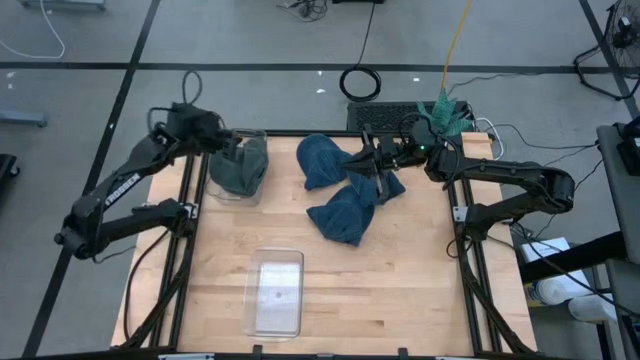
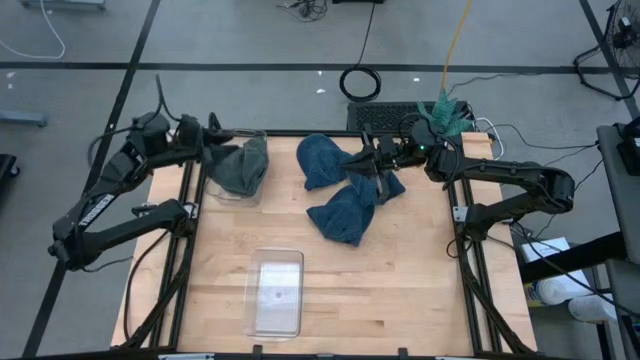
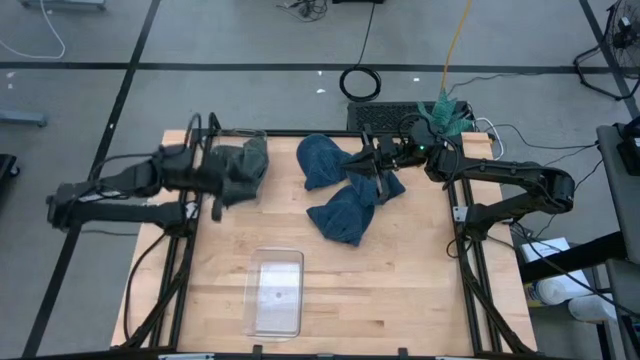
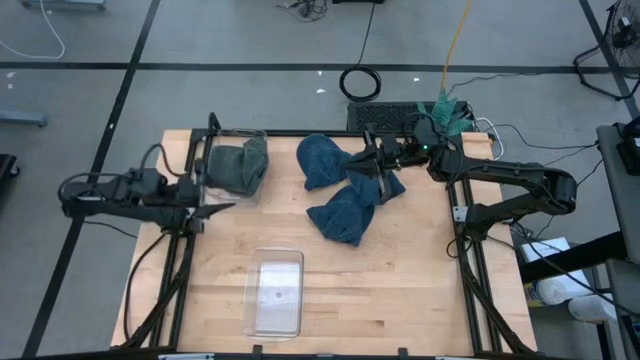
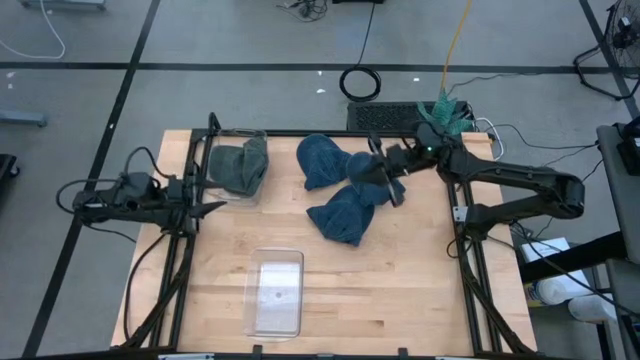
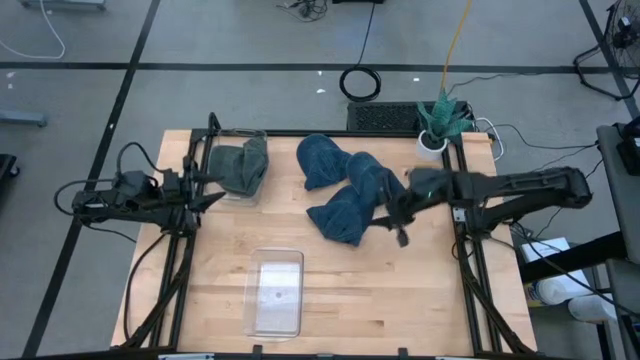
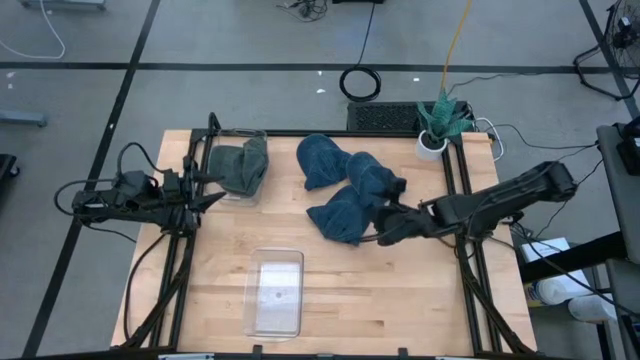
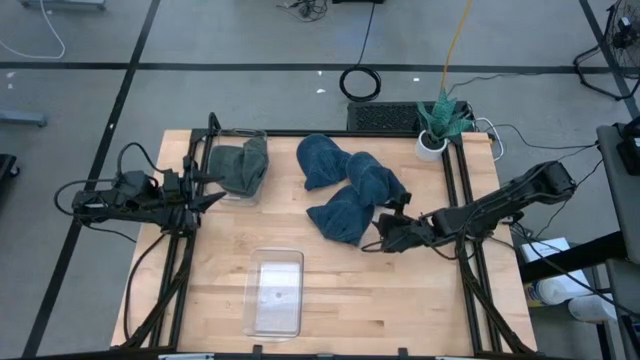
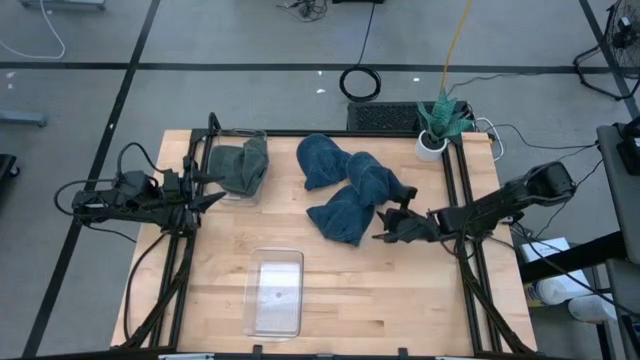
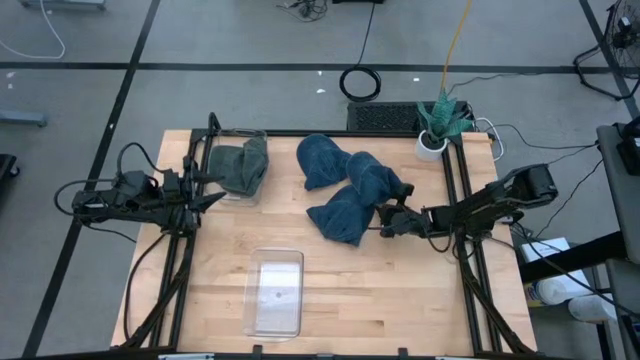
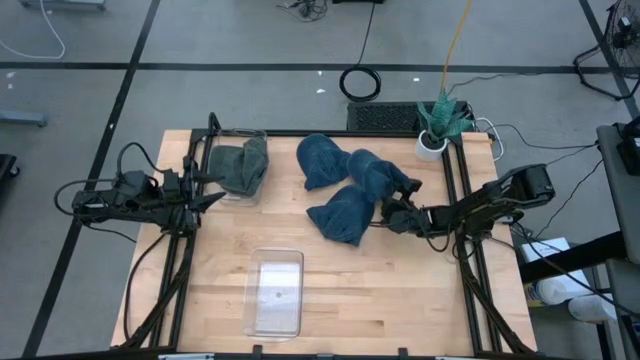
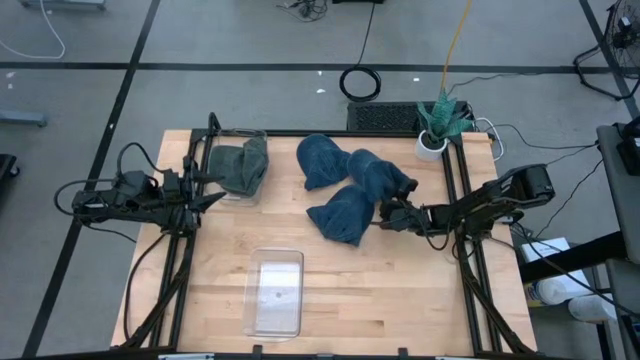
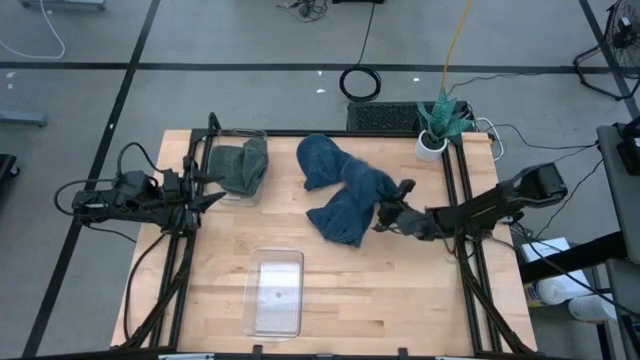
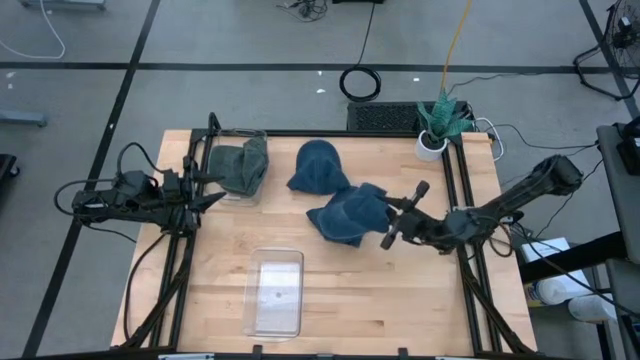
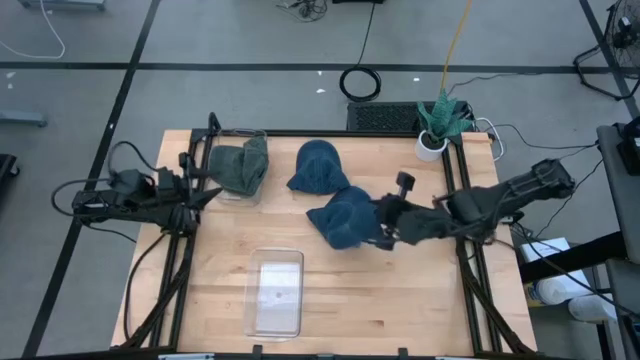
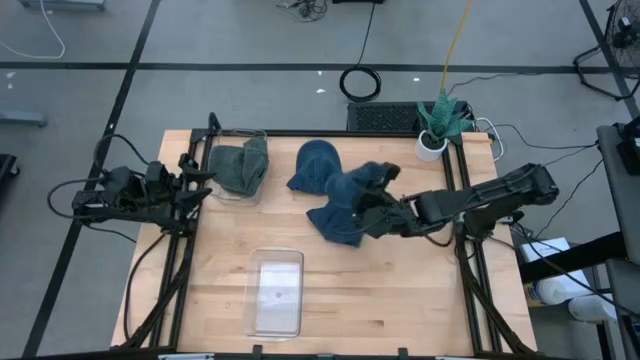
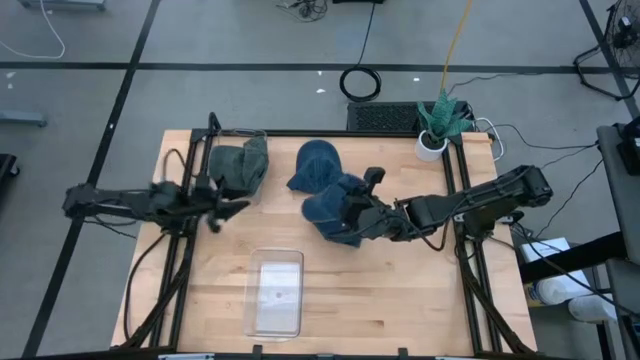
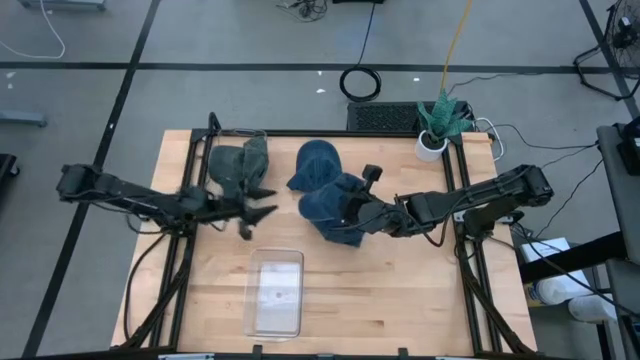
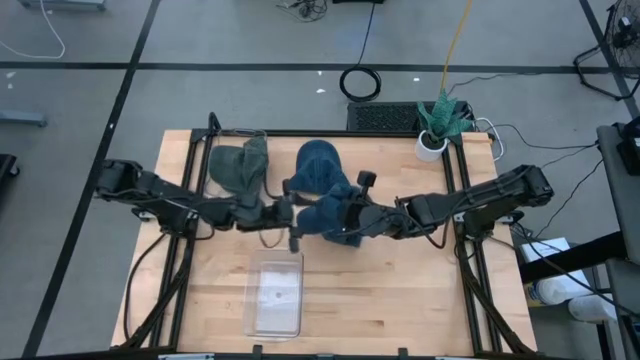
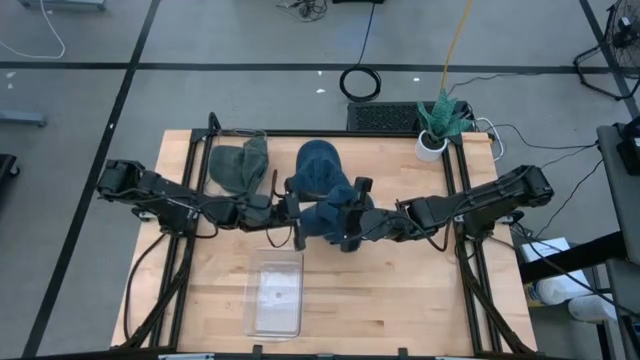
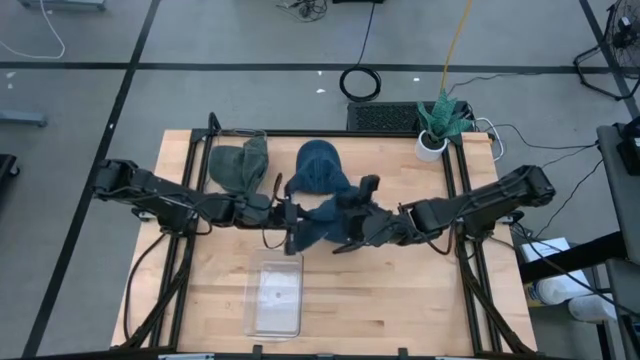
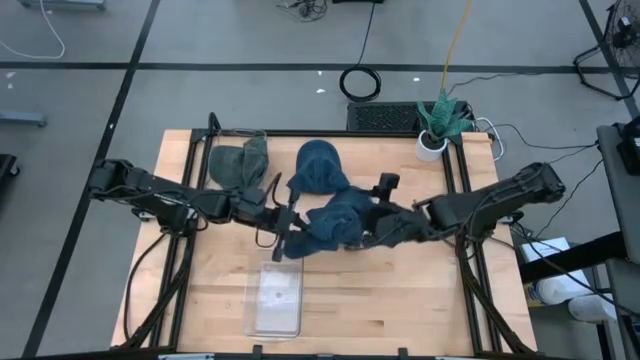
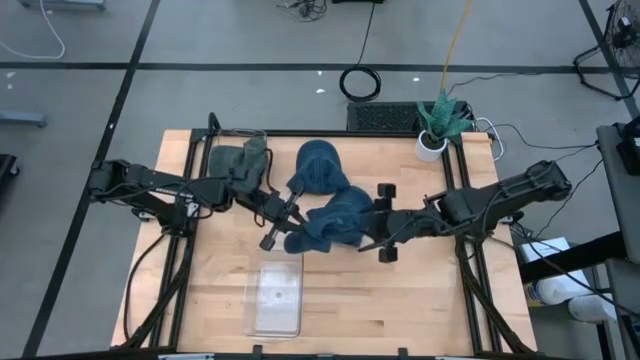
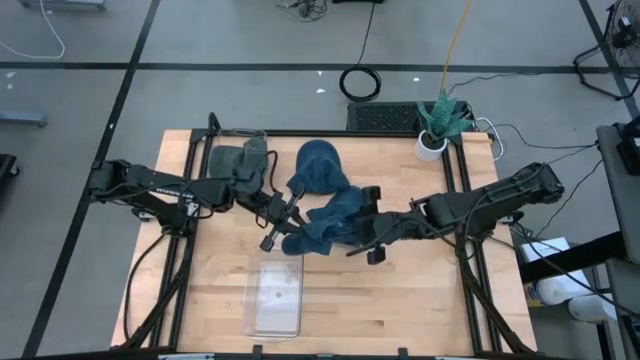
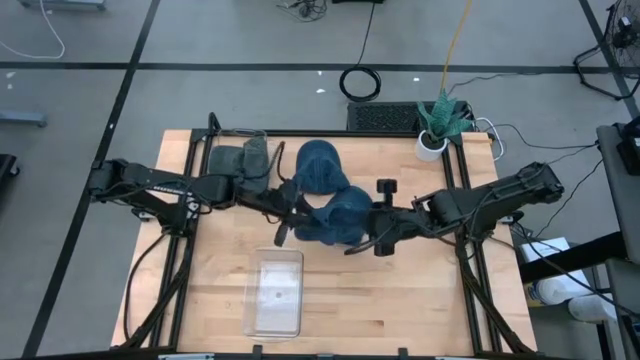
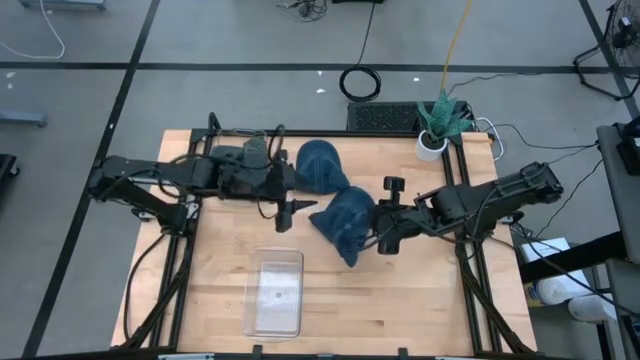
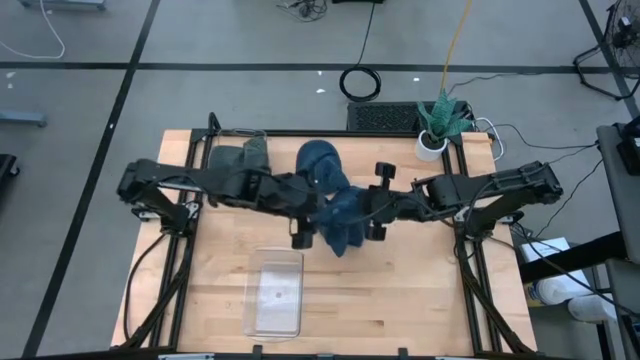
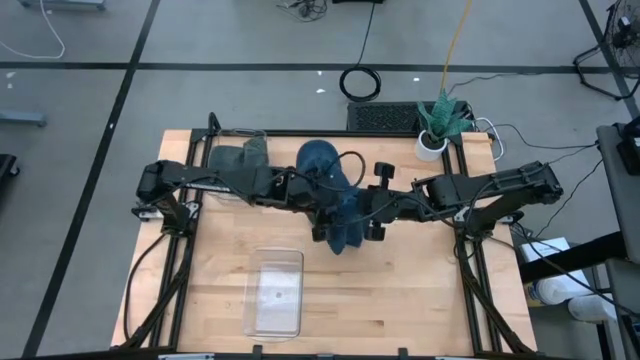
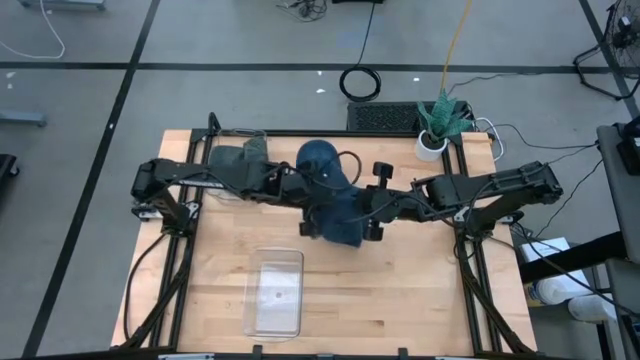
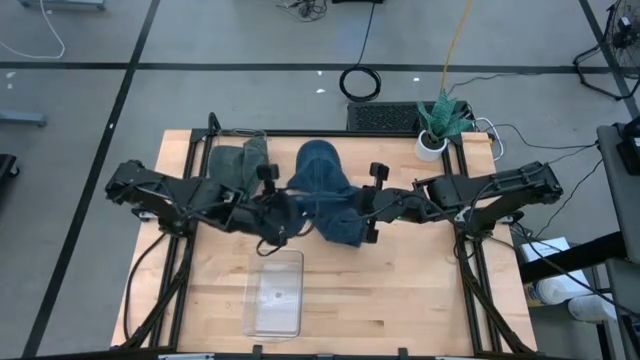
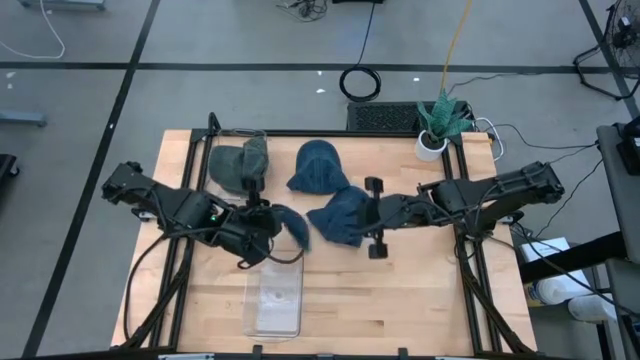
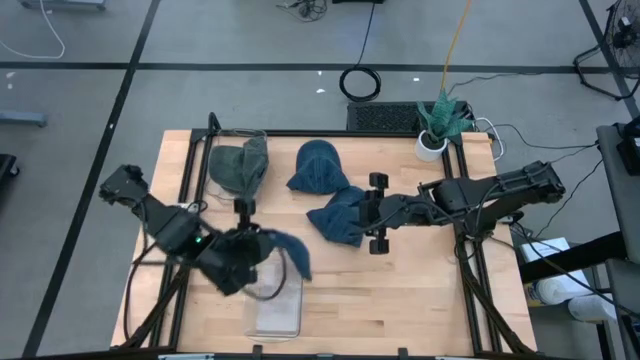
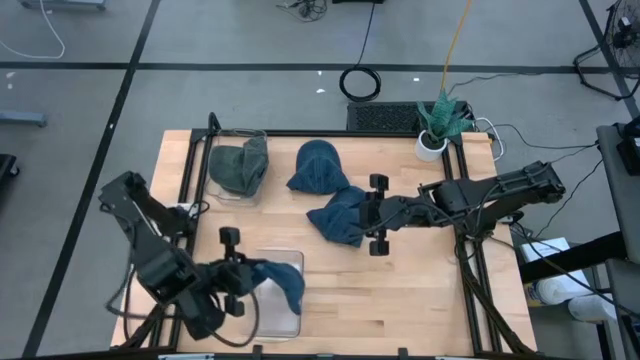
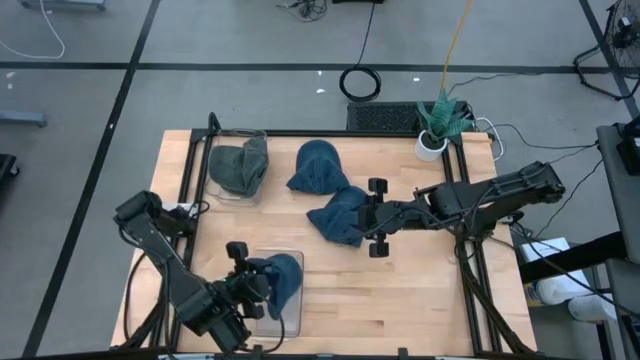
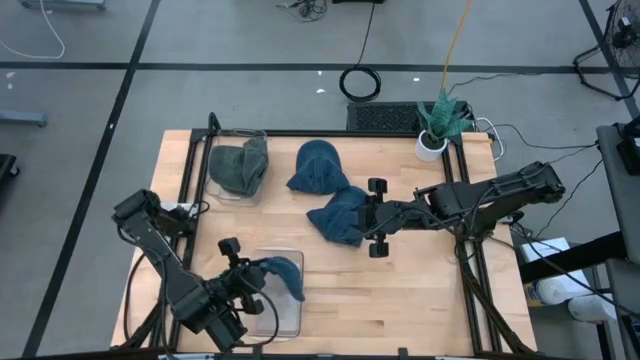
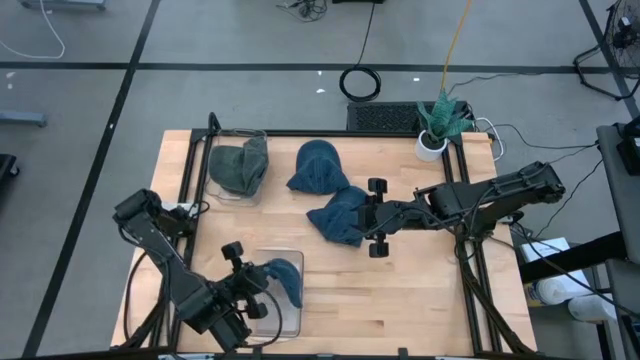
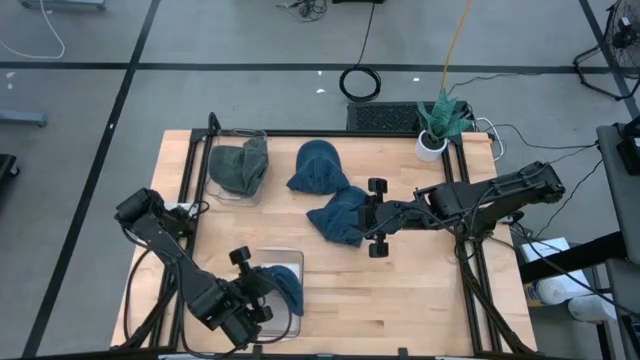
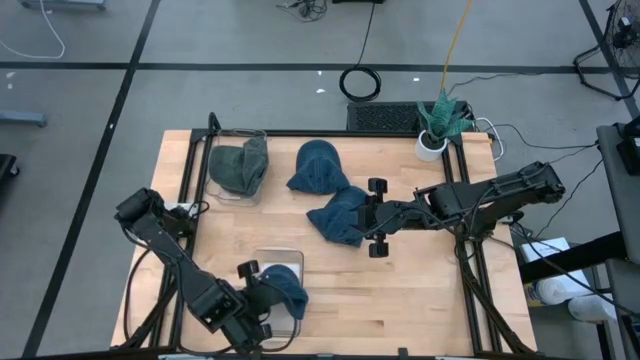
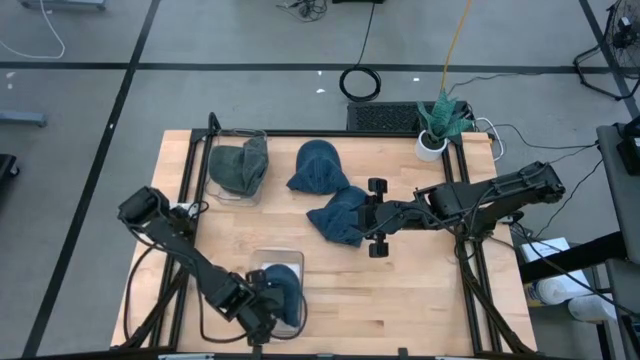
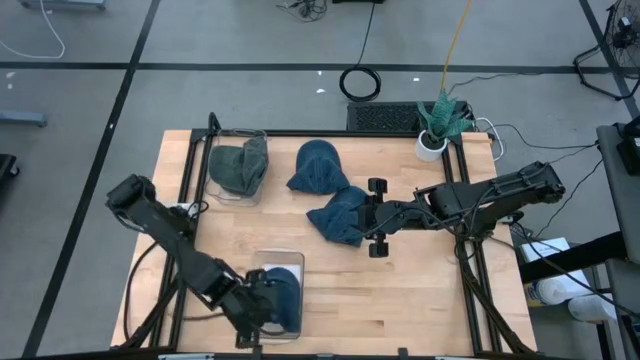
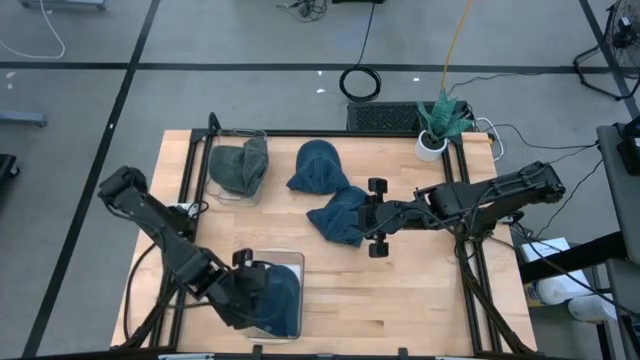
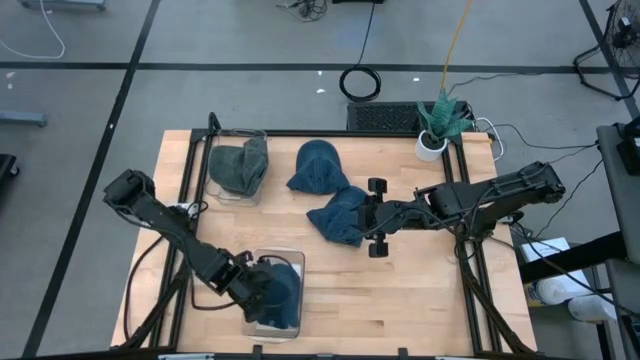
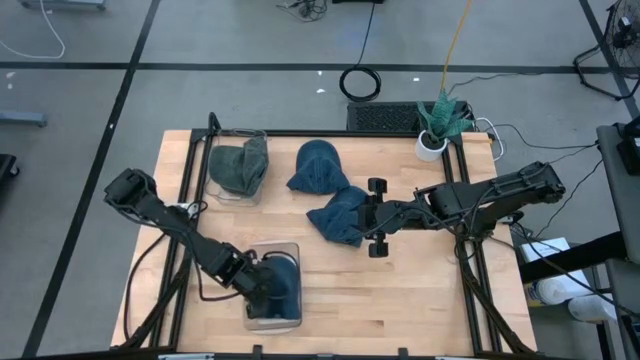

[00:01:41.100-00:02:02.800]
Task: Pick & Place hat
Put the bottom blue cap into the bottom transparent bin

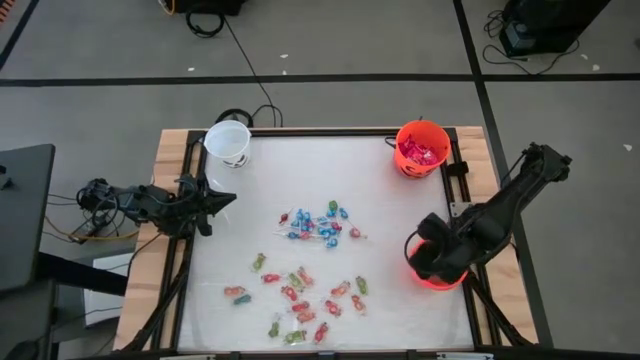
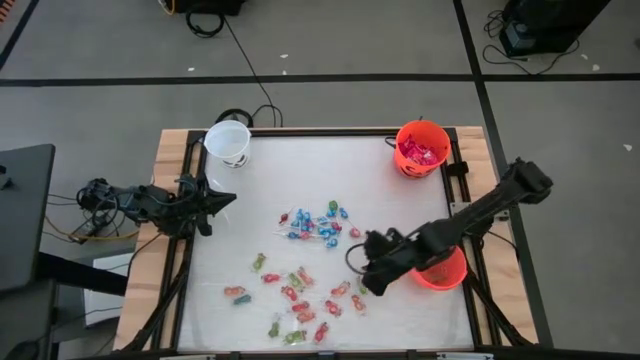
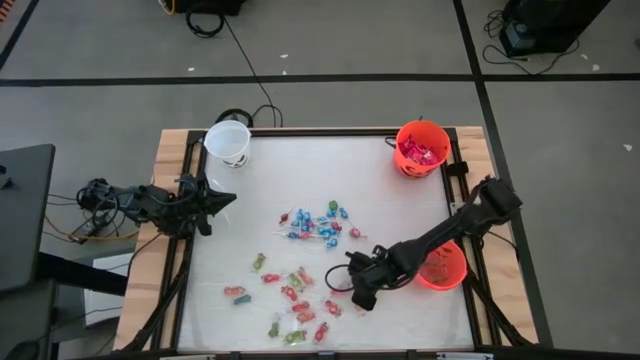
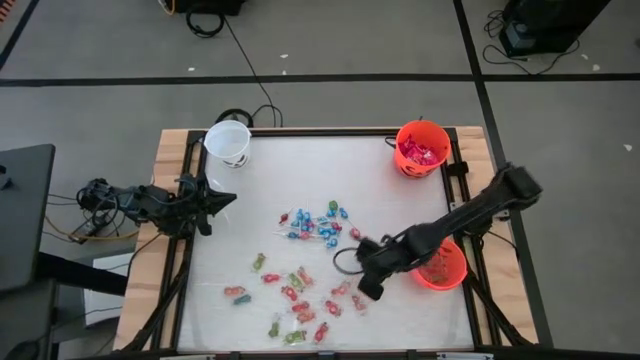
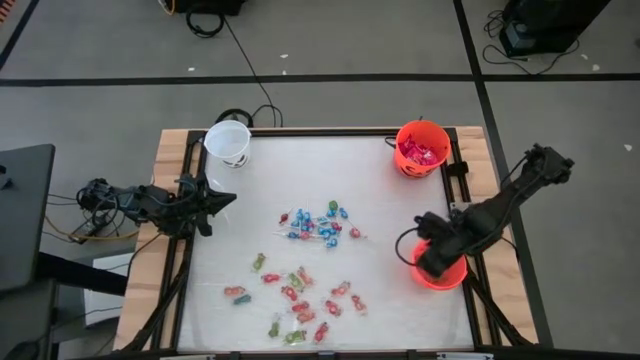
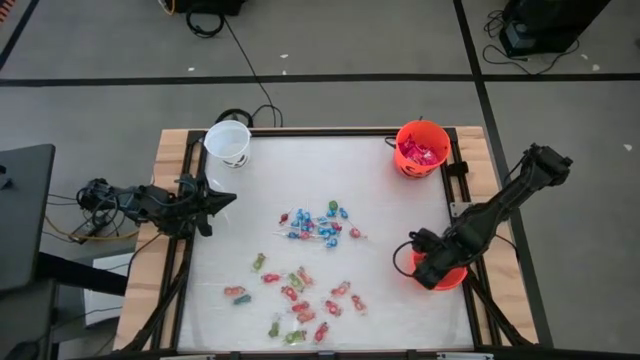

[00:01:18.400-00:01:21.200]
Task: Sort candy by brand, put in halloween buckets
Put the green gummy into the bottom orange bucket
